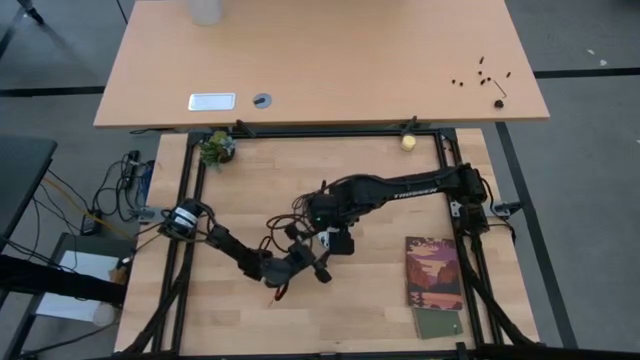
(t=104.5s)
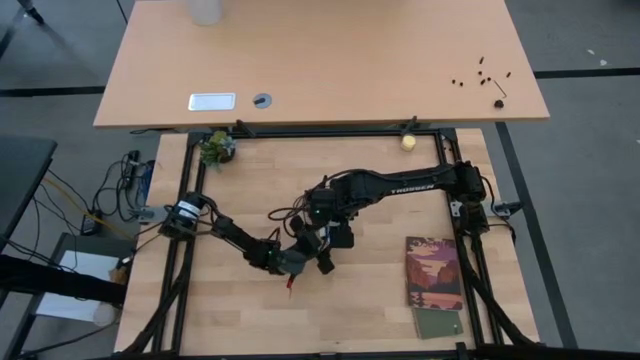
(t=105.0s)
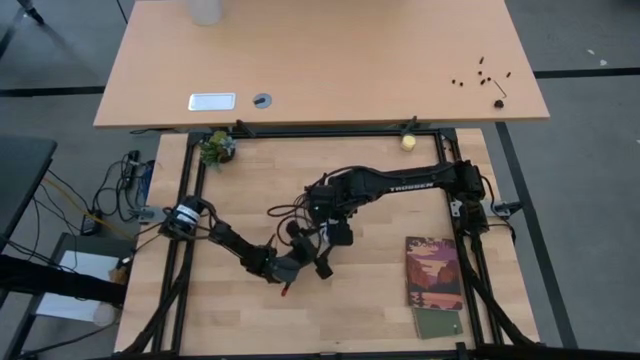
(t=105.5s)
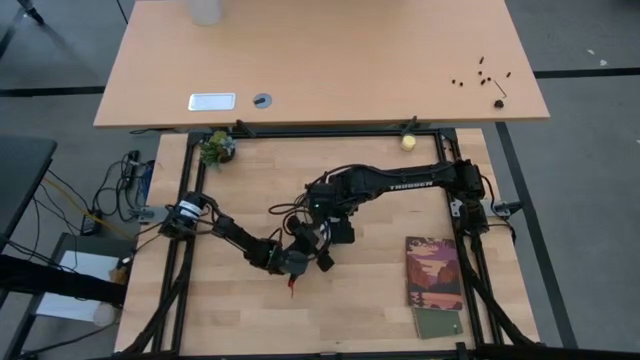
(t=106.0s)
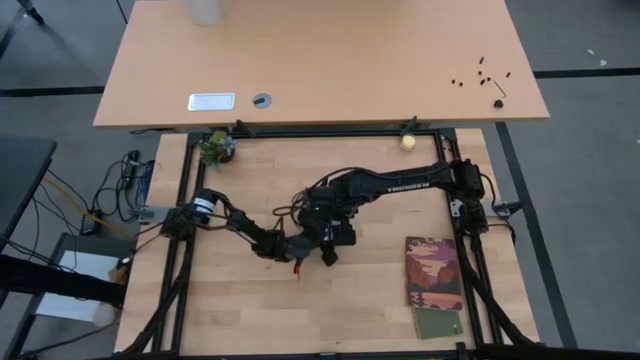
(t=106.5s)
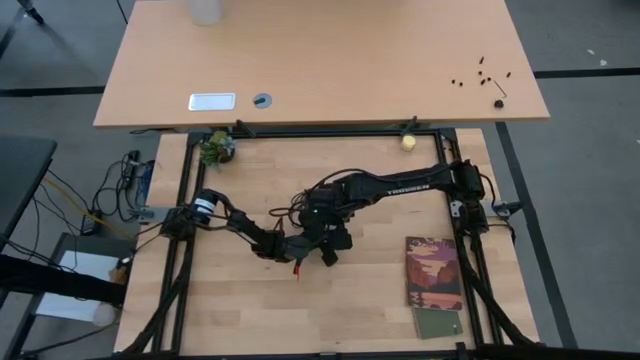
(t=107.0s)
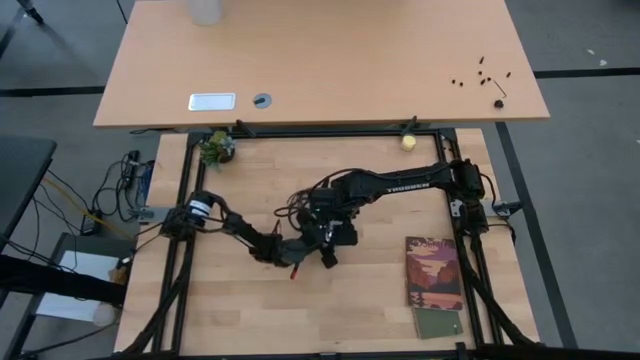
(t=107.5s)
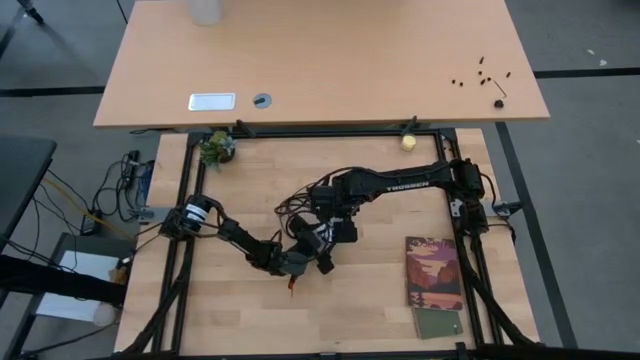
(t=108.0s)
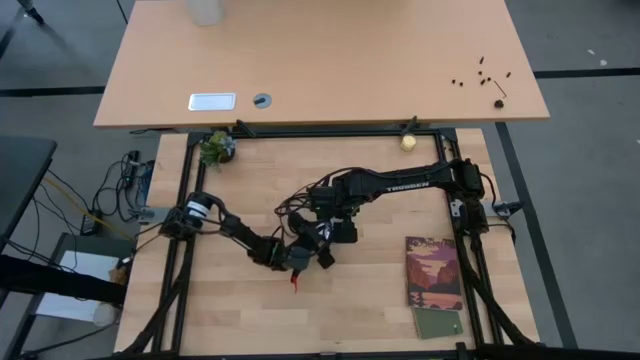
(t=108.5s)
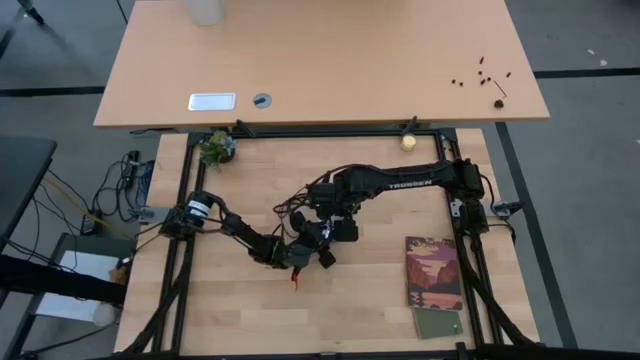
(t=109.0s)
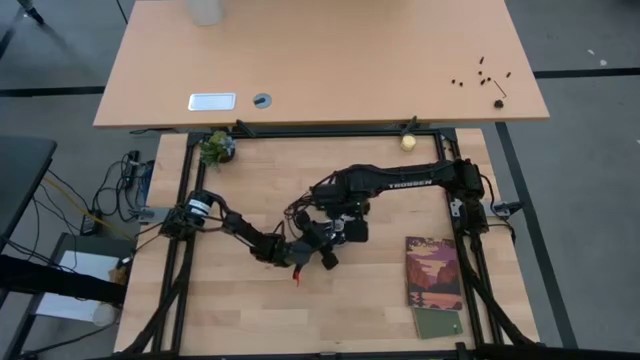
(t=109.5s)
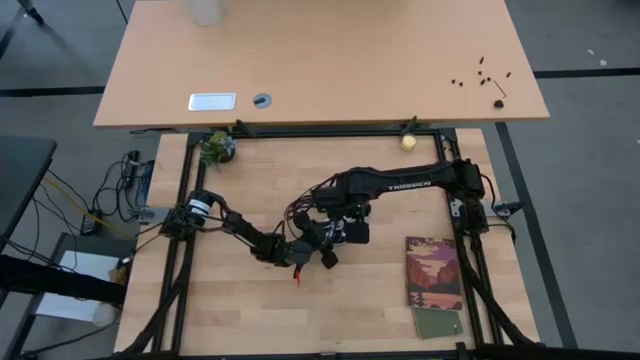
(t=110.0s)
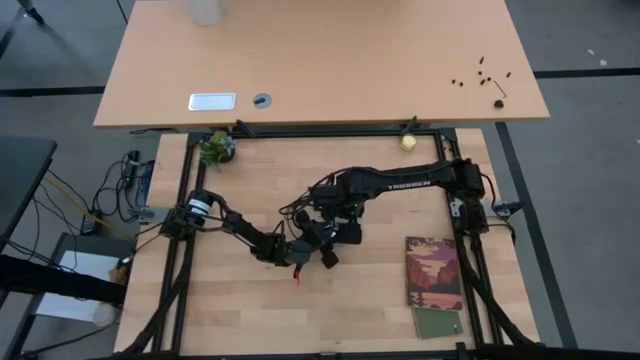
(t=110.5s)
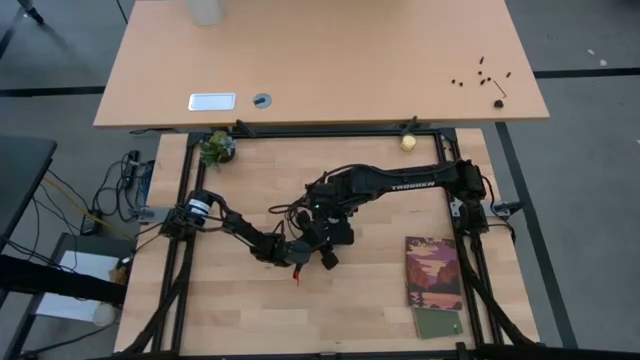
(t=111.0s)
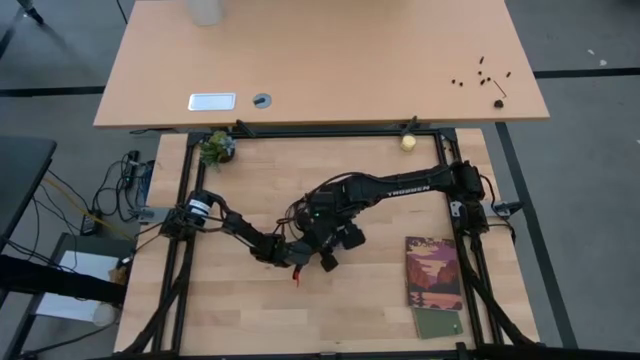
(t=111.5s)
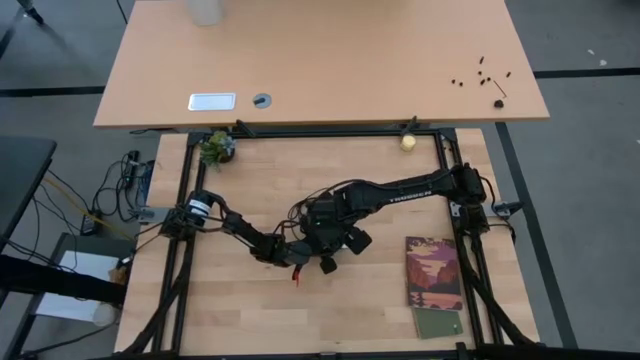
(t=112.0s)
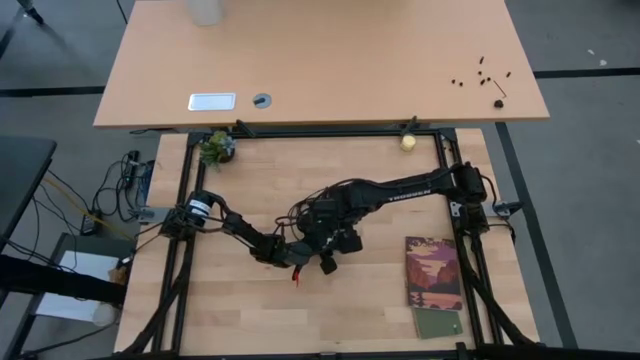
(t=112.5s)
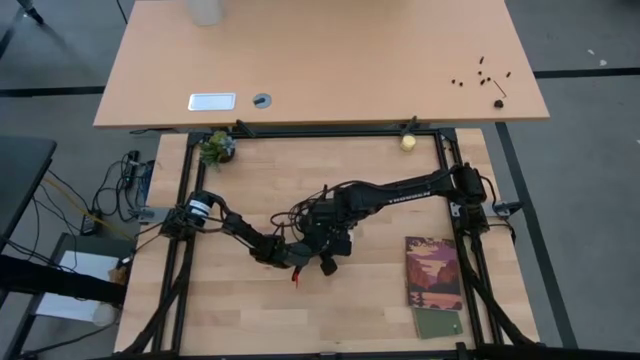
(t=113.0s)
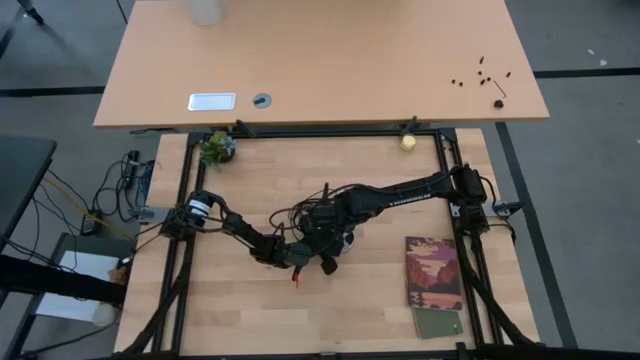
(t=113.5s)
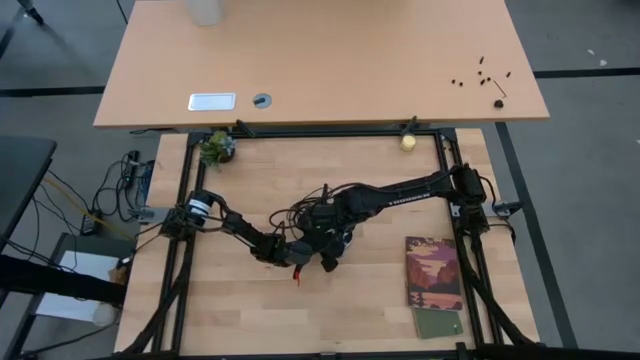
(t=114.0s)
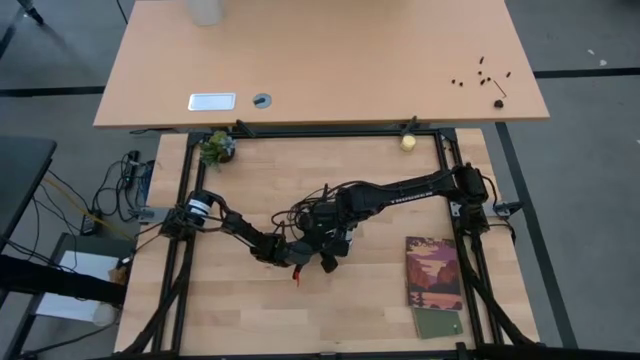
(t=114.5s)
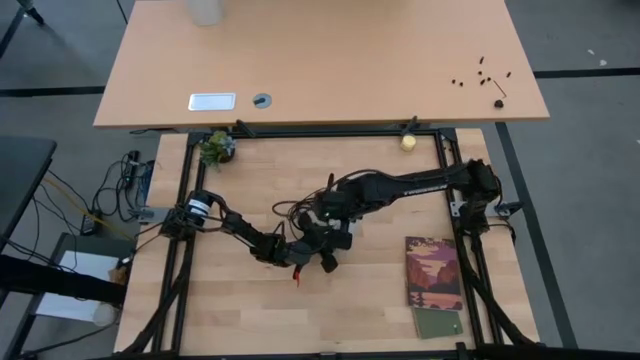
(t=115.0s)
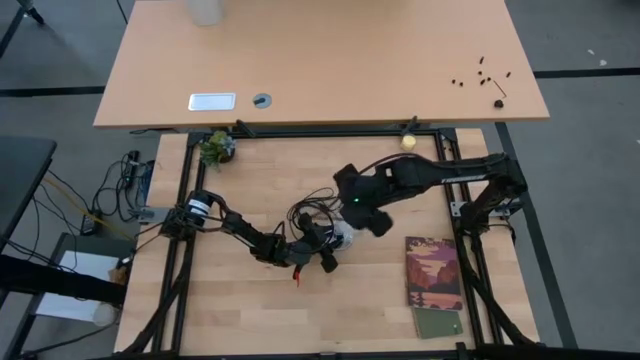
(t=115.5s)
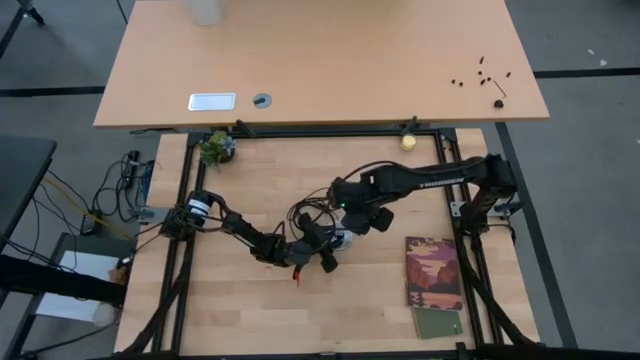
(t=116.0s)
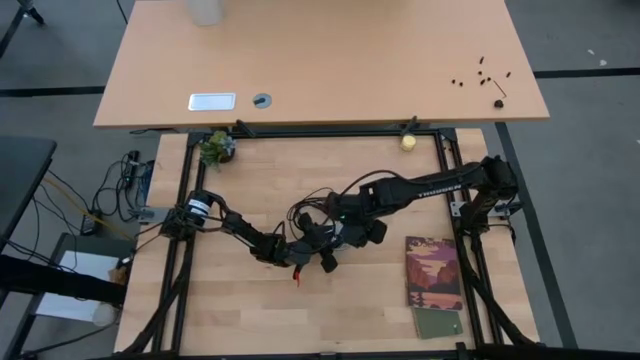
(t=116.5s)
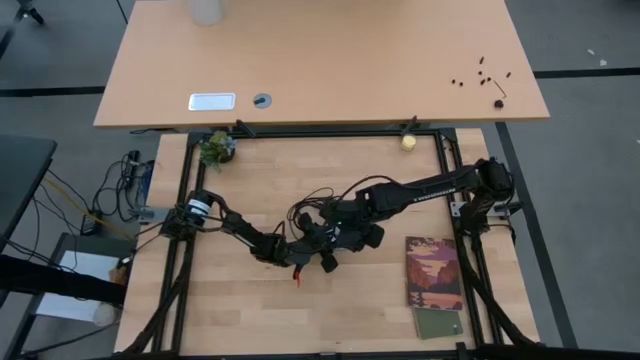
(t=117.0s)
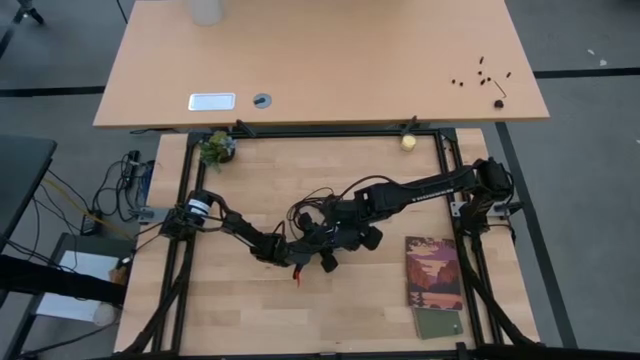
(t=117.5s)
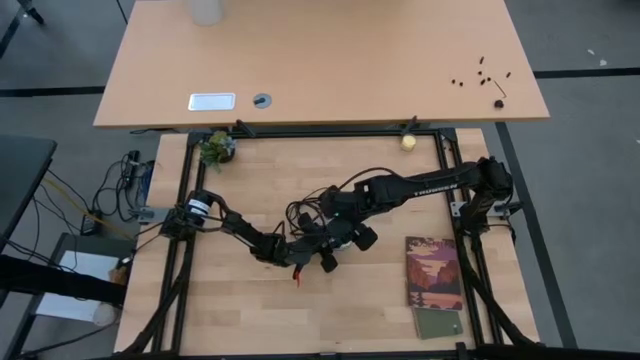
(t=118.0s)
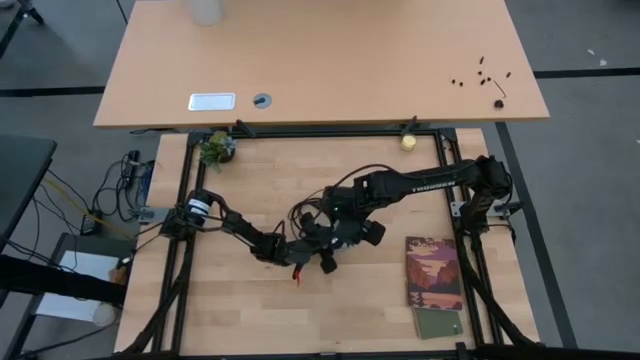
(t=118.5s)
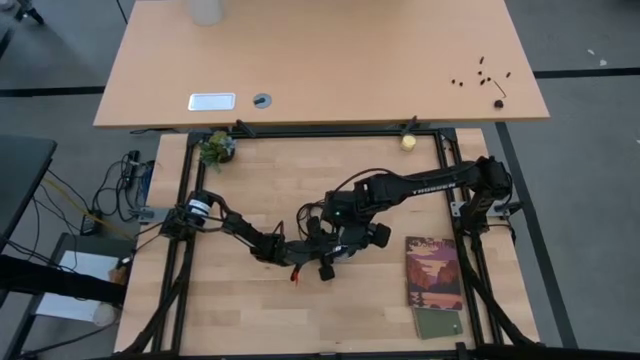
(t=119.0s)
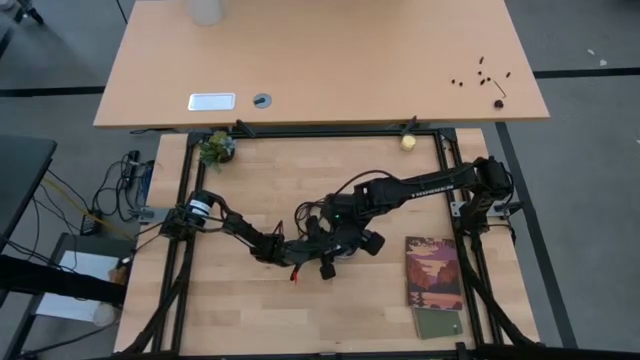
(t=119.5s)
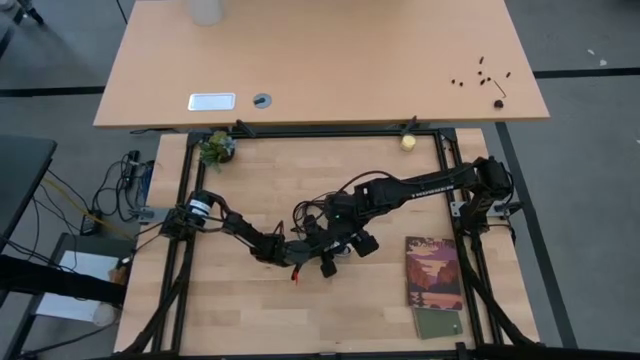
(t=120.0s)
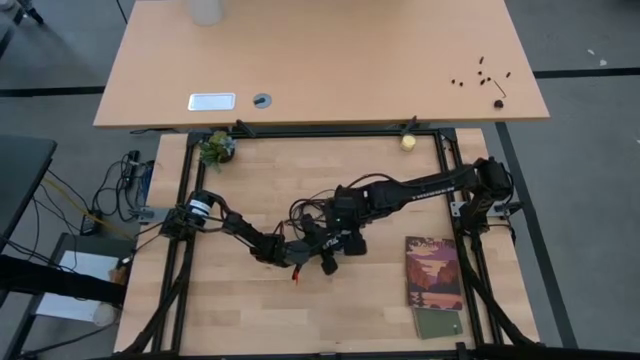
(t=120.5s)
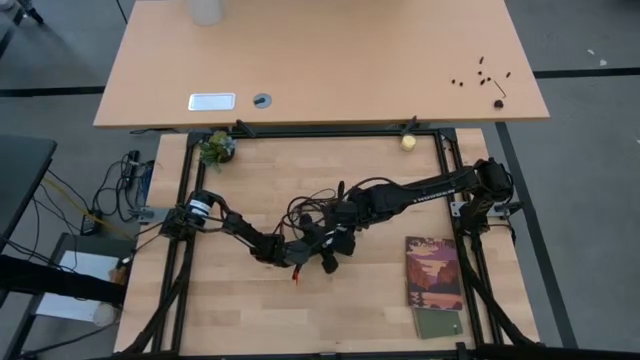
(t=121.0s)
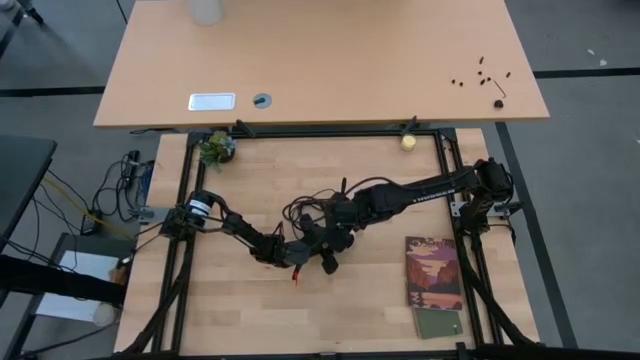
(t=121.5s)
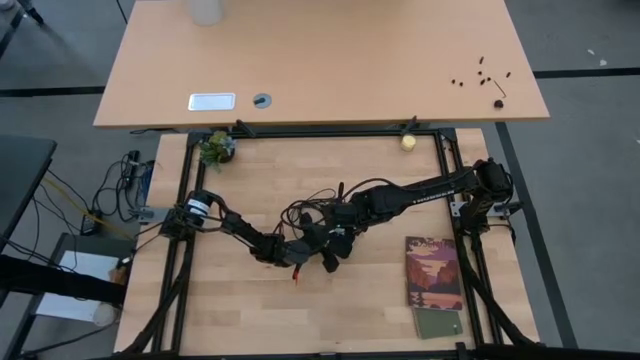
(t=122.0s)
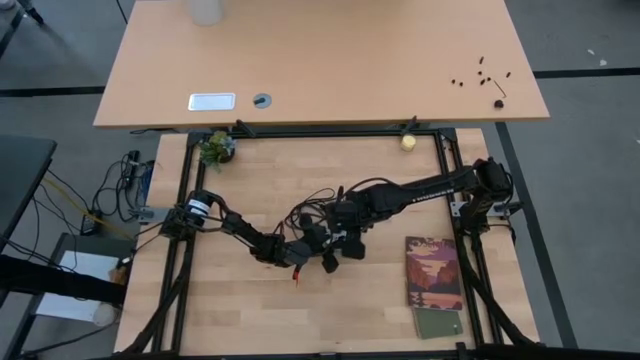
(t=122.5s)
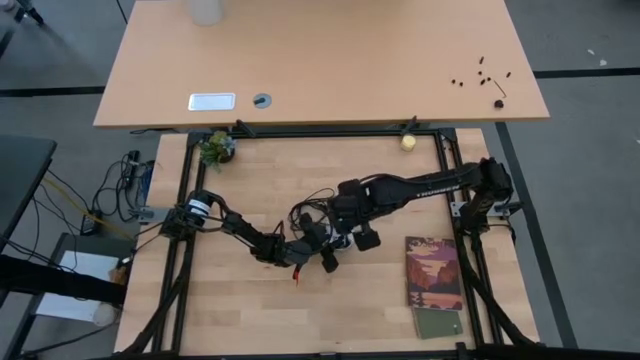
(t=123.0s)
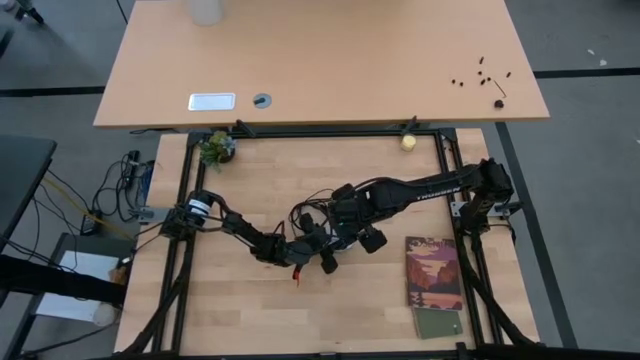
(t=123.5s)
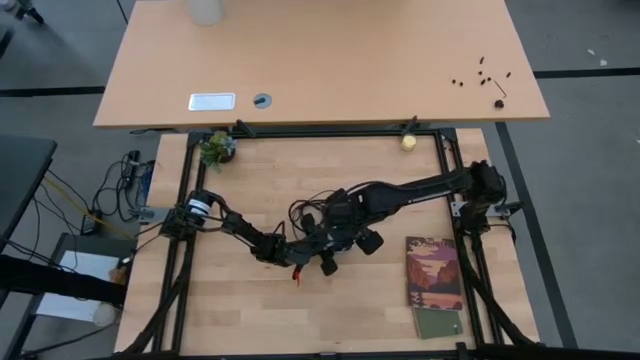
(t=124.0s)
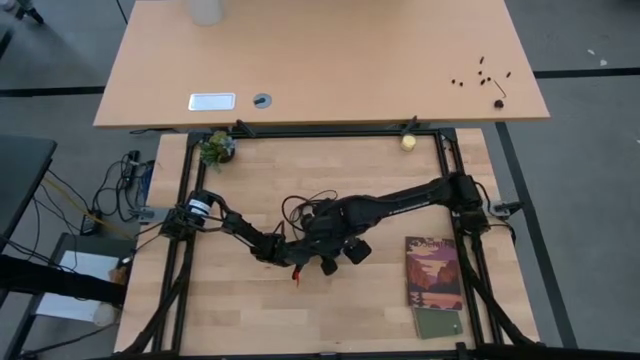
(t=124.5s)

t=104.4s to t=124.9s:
Task: Screw lightbulb
Insert the white lightbulb into the silver lamp
